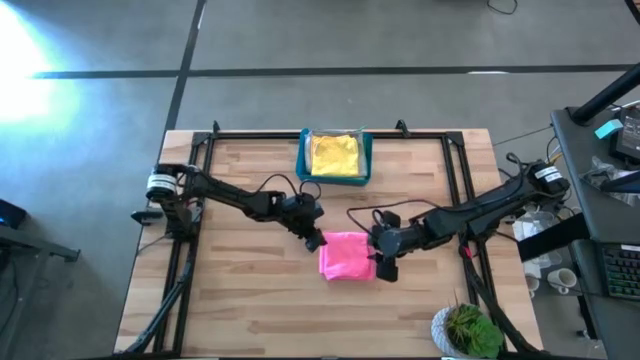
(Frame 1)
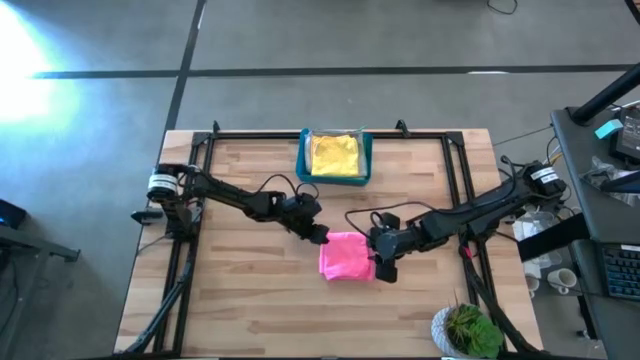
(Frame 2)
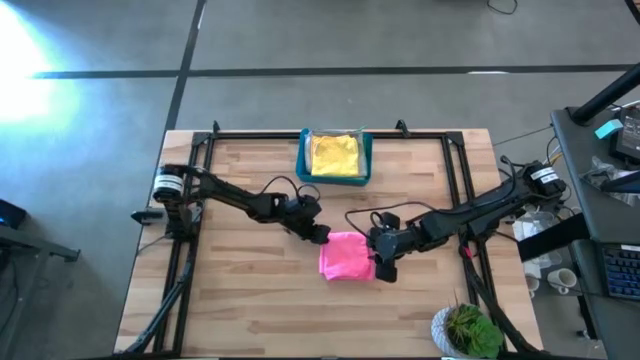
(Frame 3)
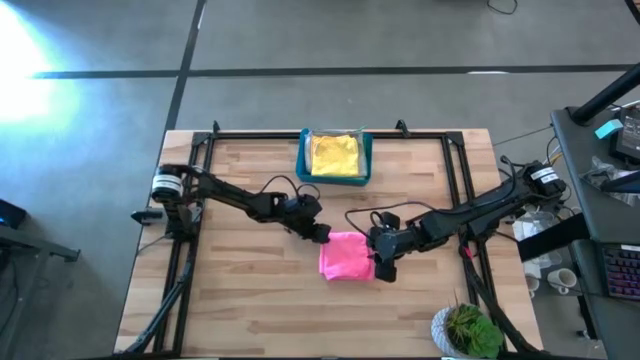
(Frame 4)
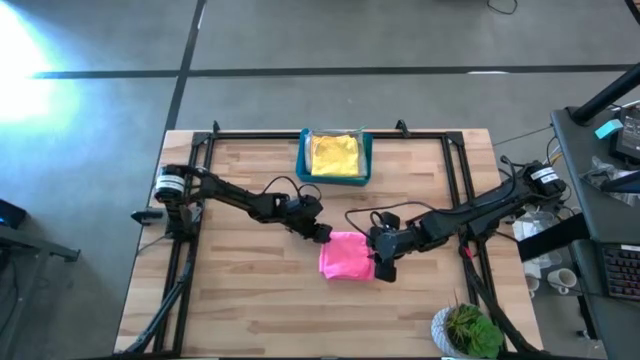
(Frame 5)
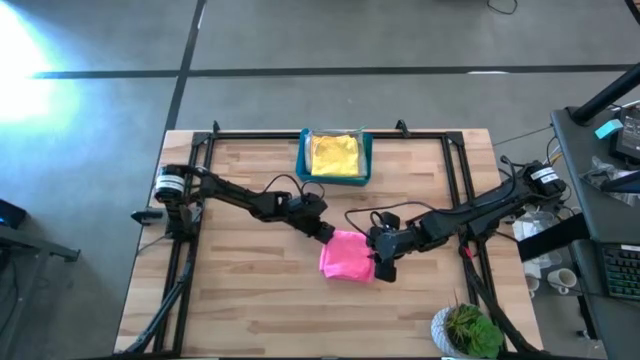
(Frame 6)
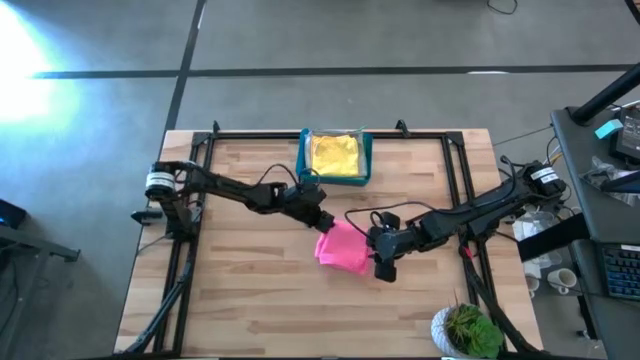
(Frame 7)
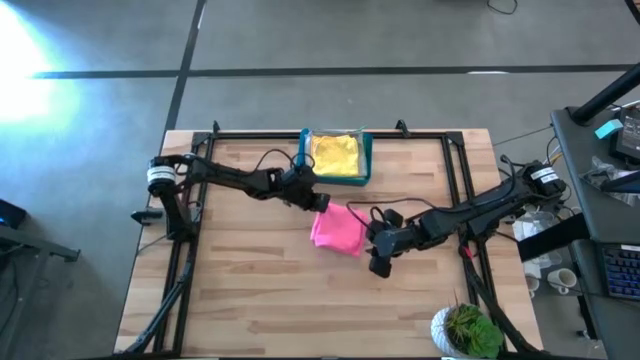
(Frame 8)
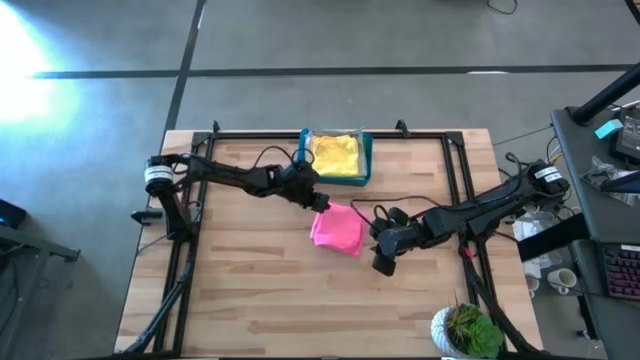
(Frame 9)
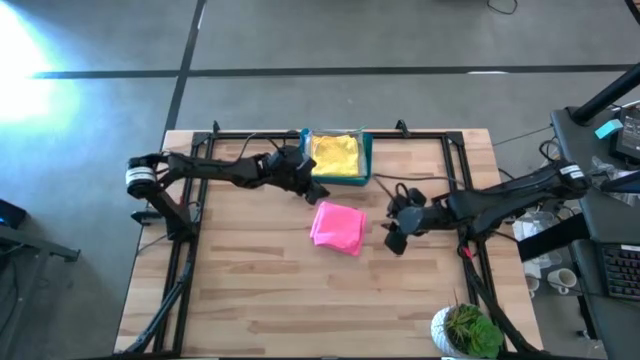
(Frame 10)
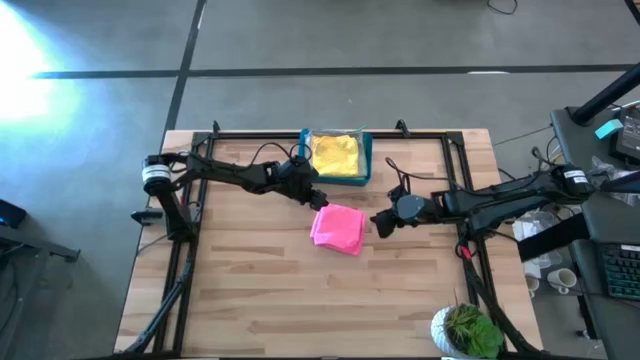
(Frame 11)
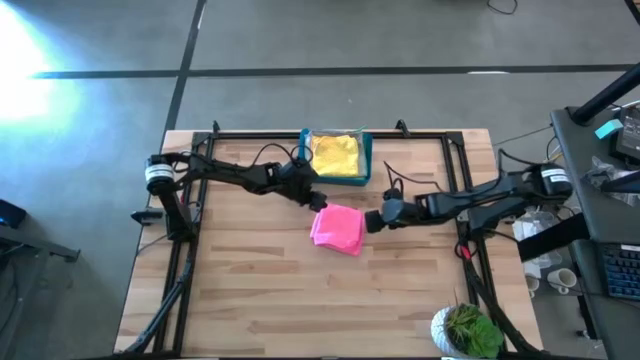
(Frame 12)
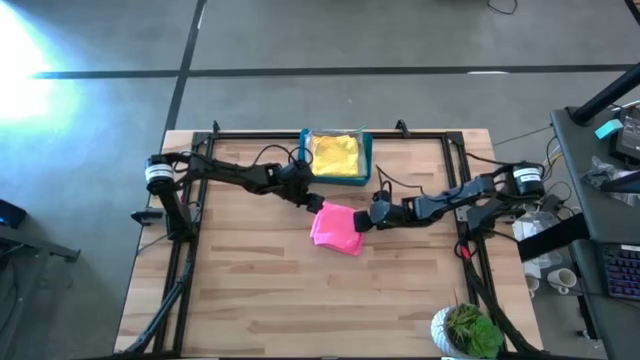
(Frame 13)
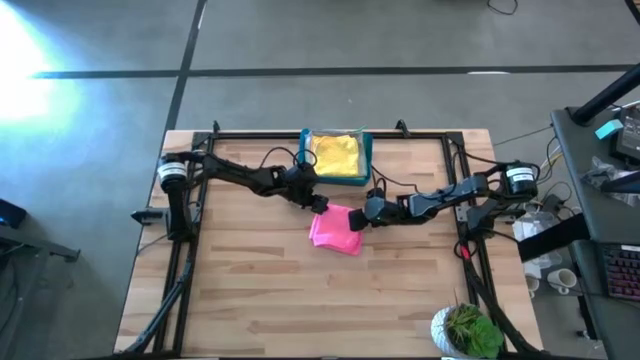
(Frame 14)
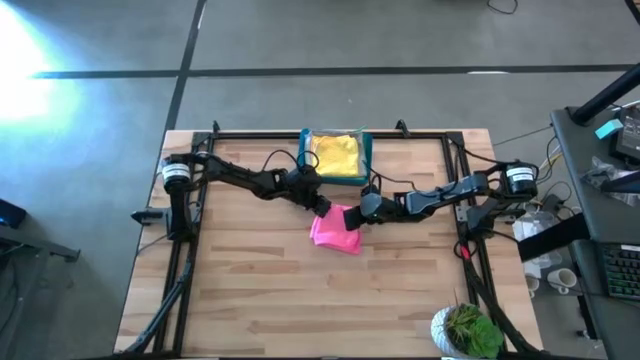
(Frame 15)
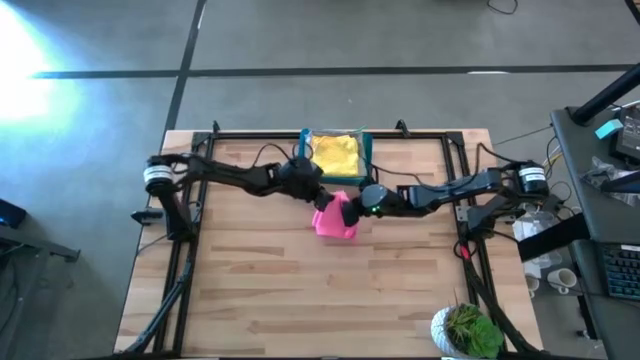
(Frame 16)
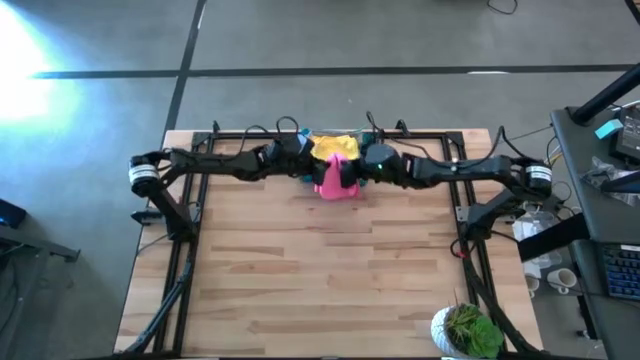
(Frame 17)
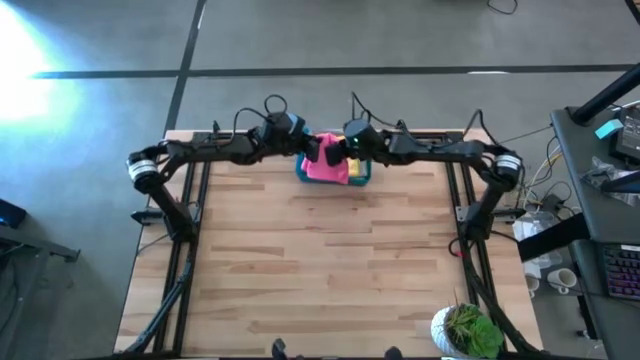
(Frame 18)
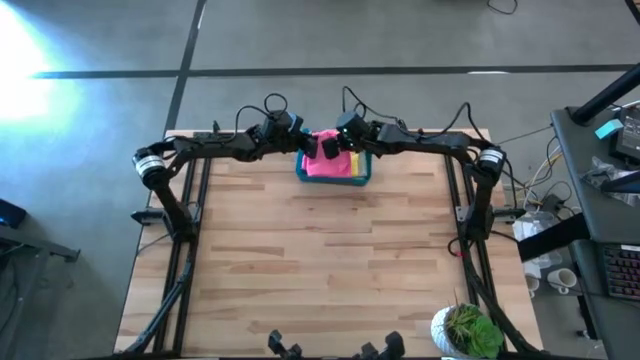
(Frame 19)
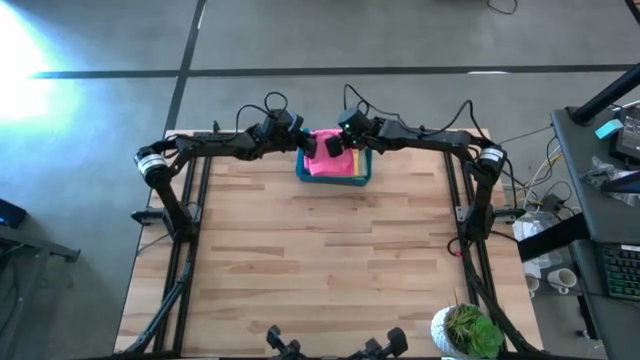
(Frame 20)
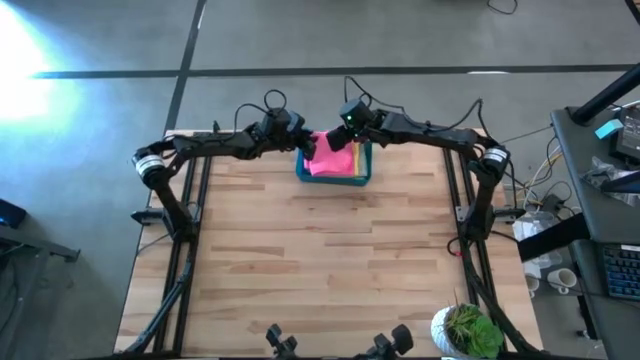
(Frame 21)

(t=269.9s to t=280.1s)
Task: Fold microfiber towels
Put the pink microfiber cloth into the blue bin

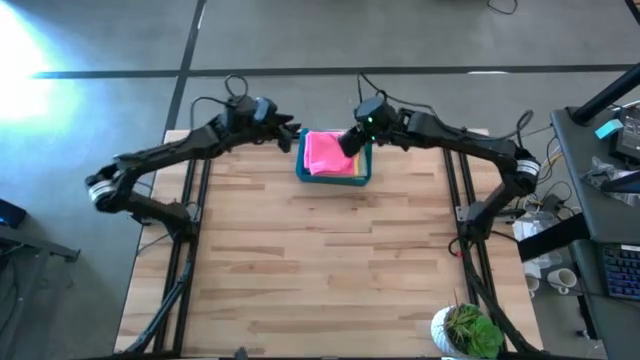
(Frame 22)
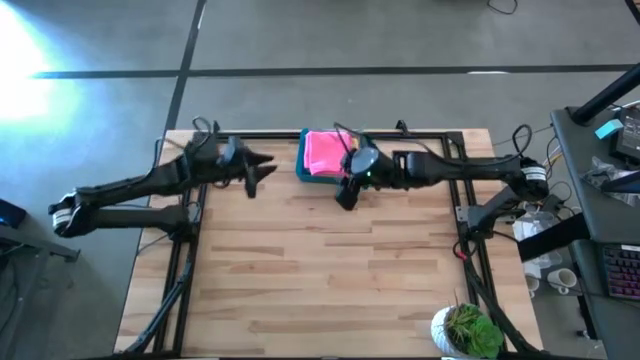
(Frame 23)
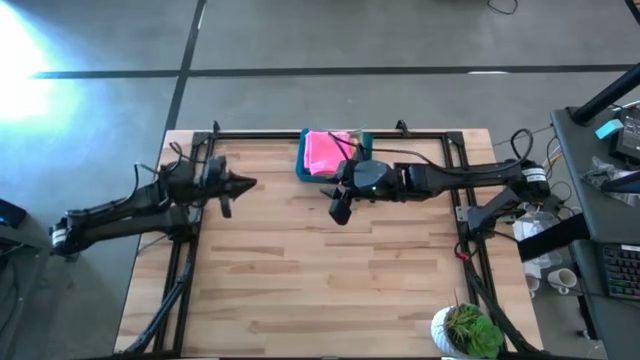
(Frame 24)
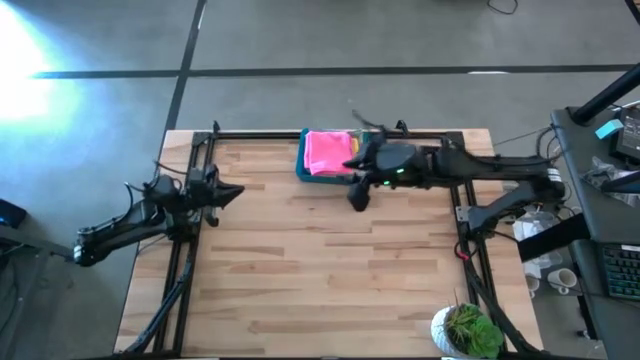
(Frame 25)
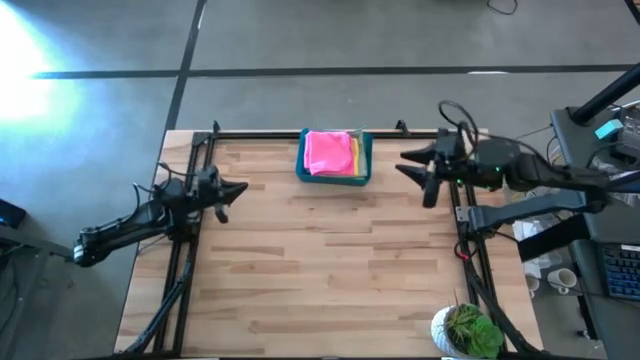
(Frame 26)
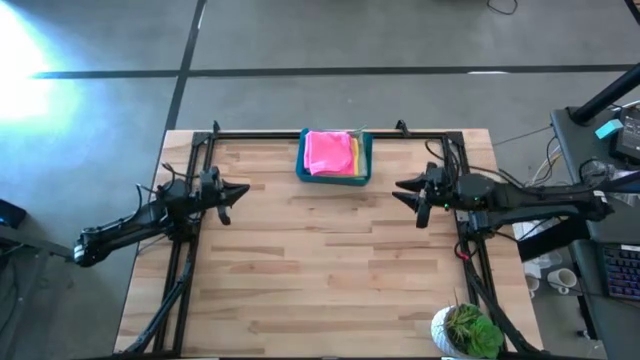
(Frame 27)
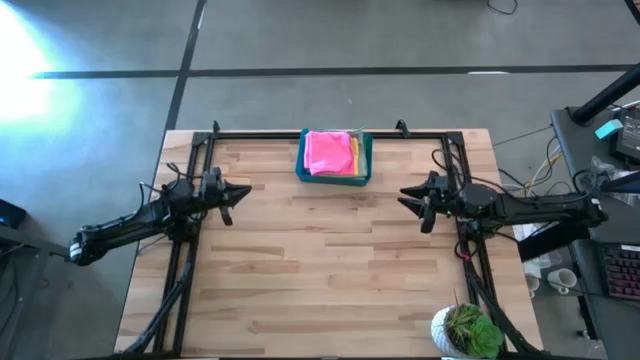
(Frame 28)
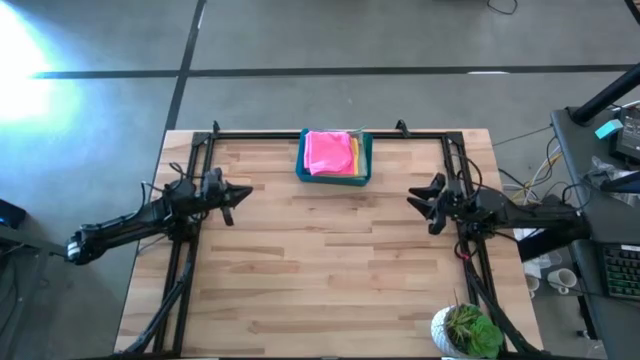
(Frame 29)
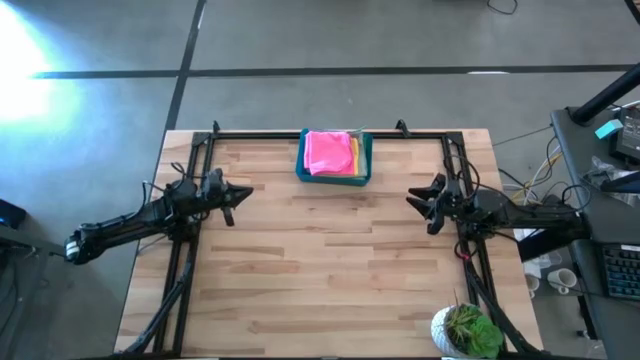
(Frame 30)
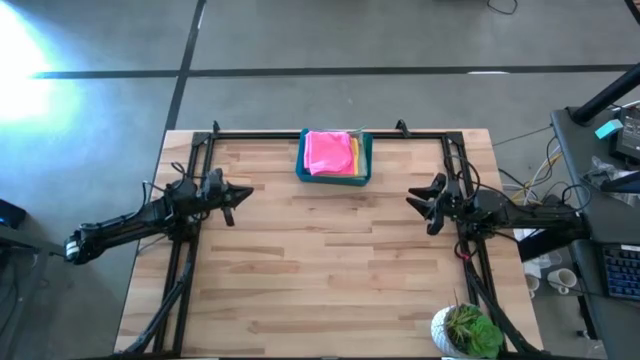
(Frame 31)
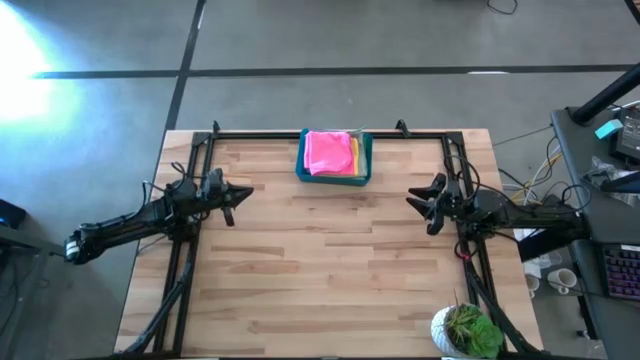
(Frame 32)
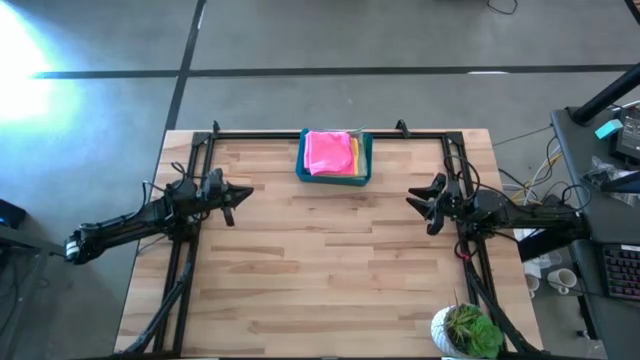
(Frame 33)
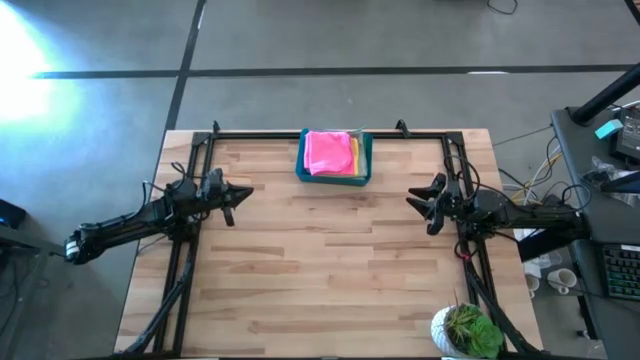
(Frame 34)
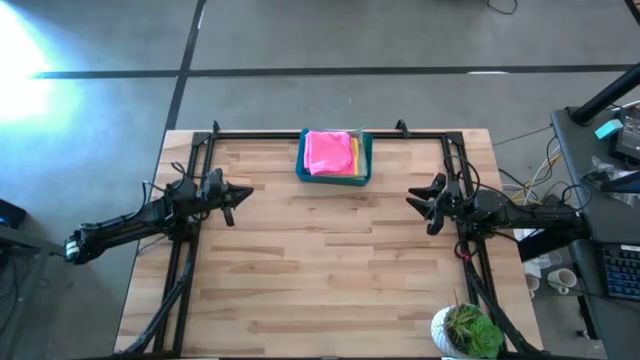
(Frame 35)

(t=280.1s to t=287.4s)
Return to Home Position

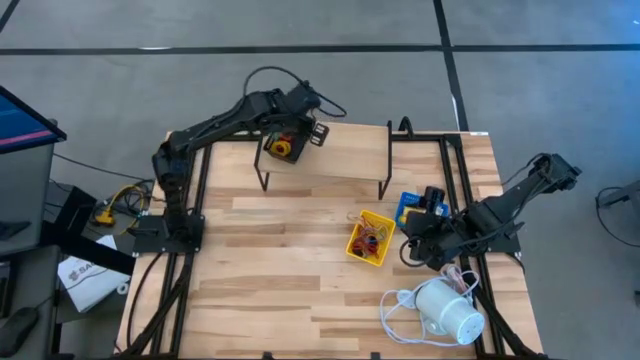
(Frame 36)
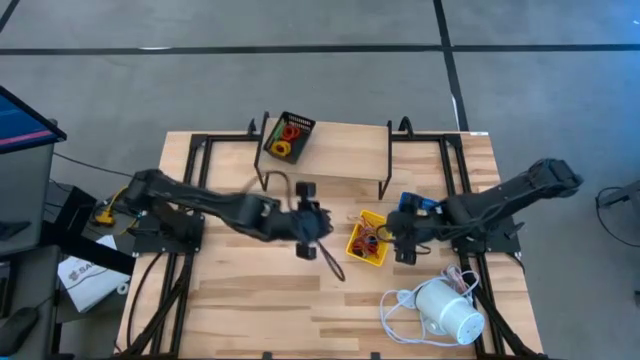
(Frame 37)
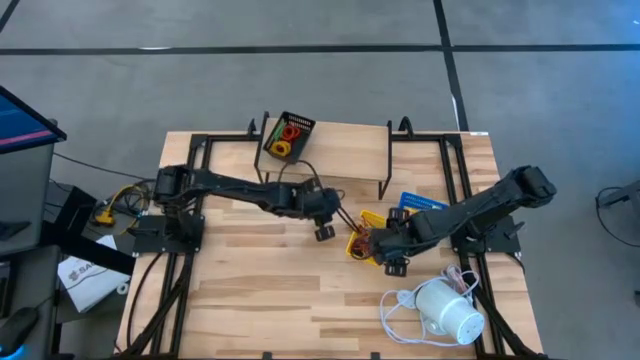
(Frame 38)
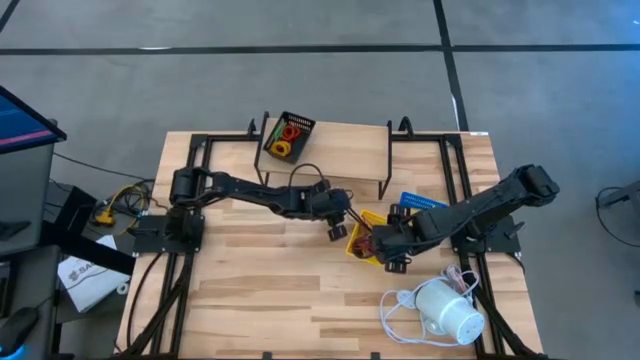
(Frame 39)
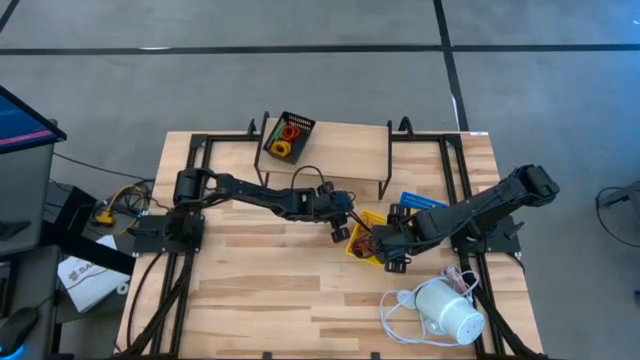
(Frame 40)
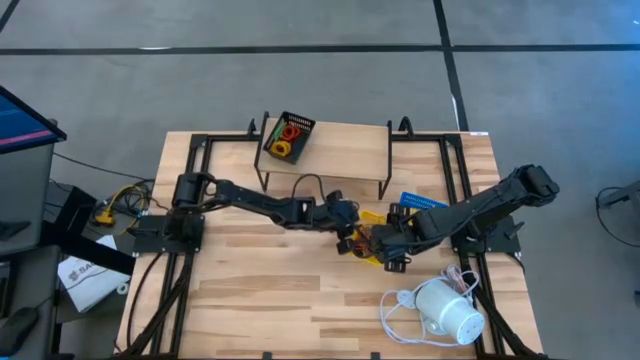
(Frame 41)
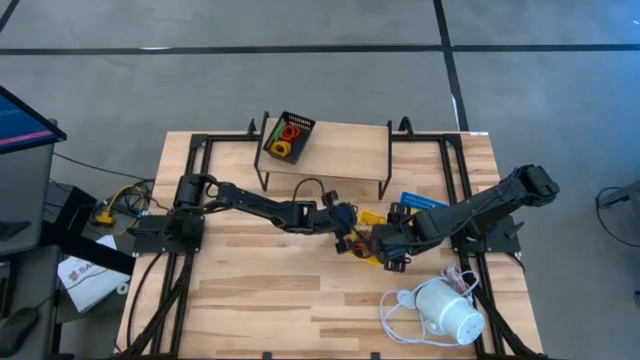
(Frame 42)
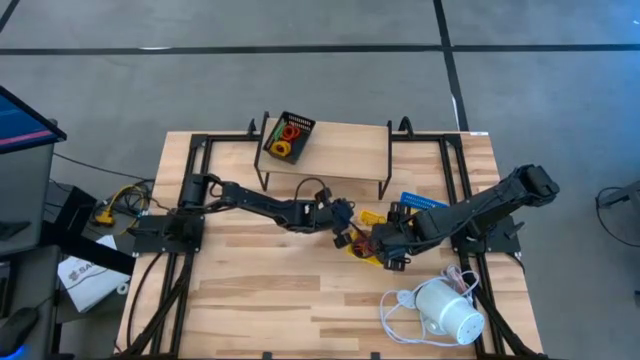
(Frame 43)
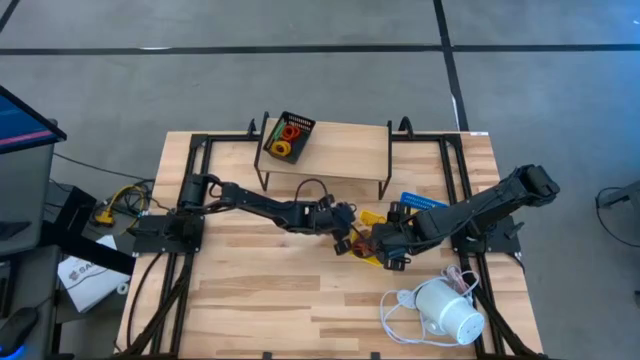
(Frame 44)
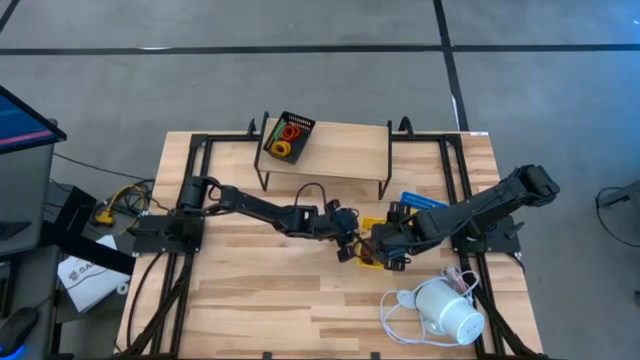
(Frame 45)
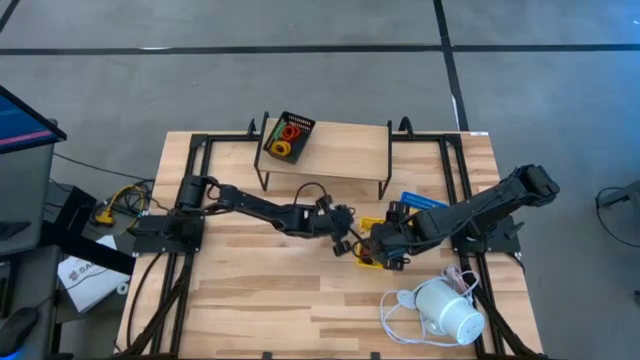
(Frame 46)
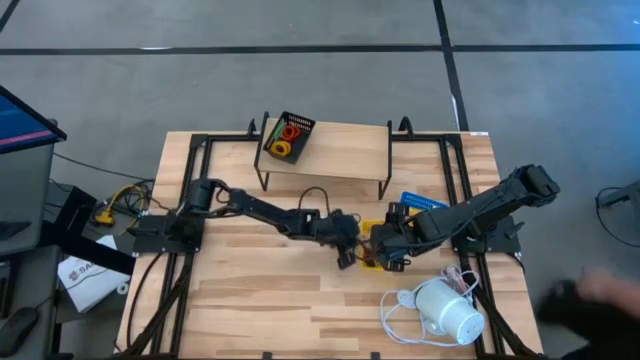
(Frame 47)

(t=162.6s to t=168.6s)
Task: Pick & Place Office Desk Supplies
Adjust the light brown rubber band in the yellow bin
